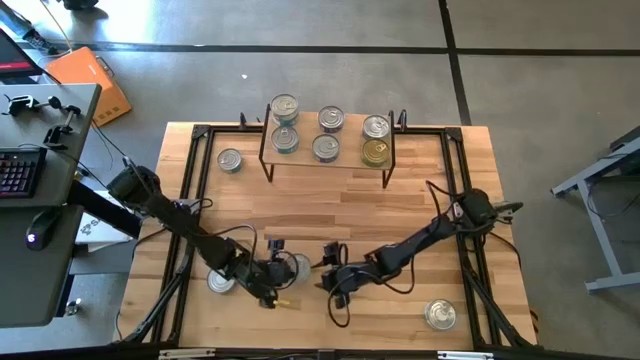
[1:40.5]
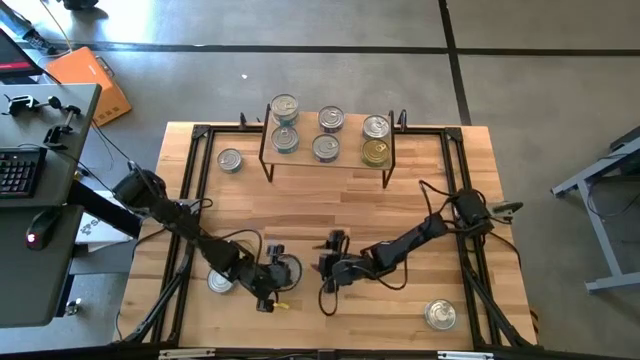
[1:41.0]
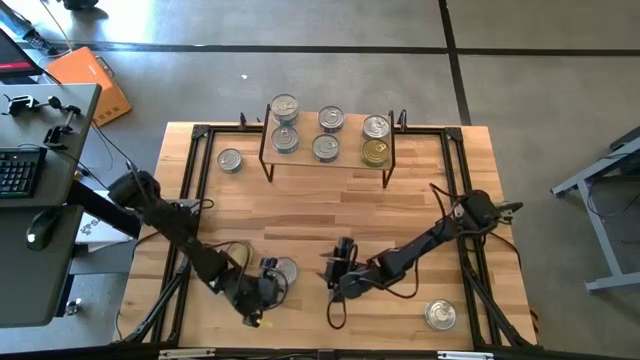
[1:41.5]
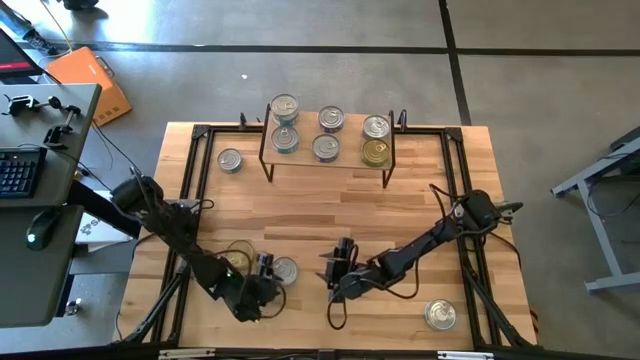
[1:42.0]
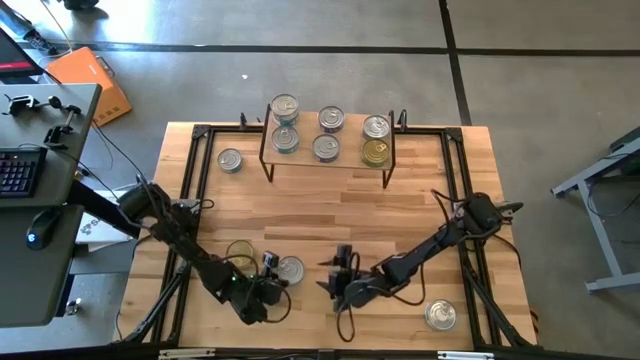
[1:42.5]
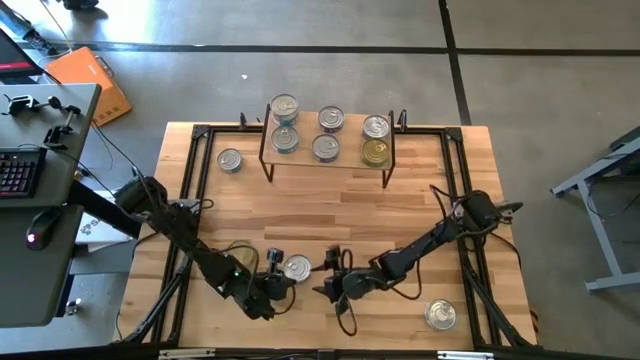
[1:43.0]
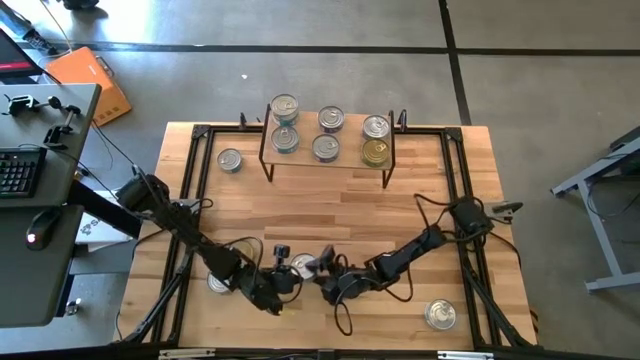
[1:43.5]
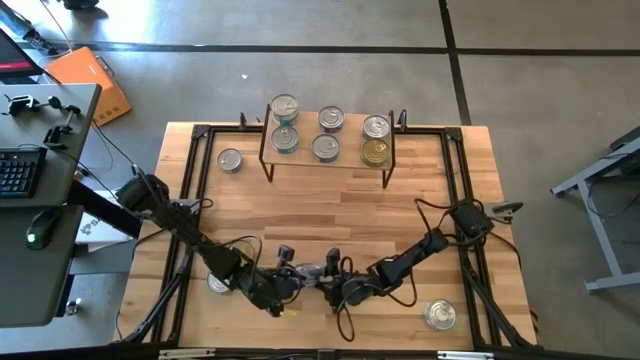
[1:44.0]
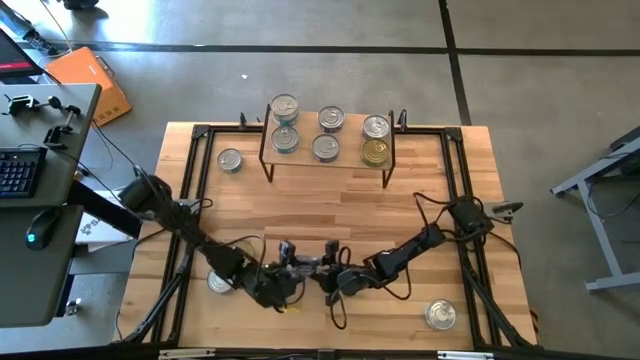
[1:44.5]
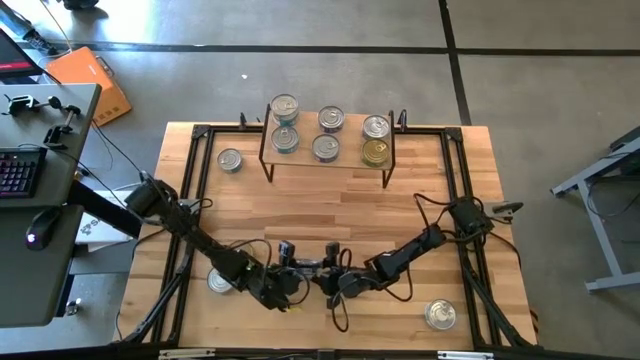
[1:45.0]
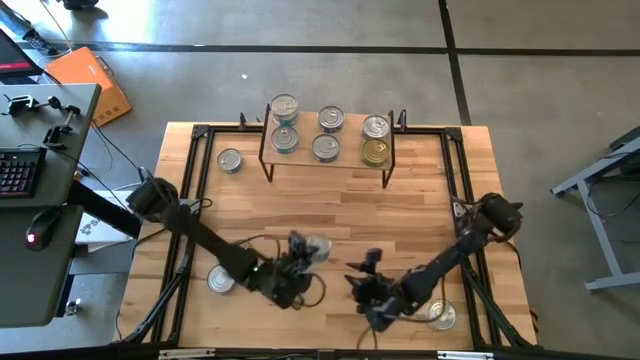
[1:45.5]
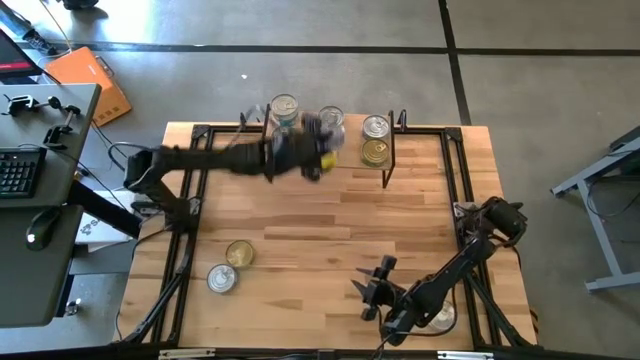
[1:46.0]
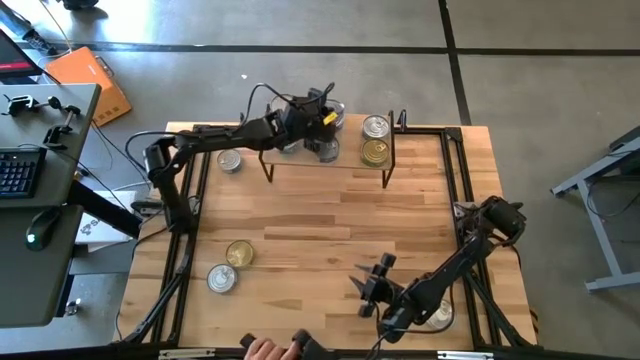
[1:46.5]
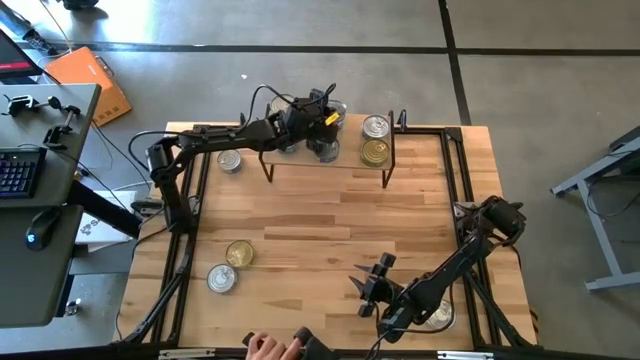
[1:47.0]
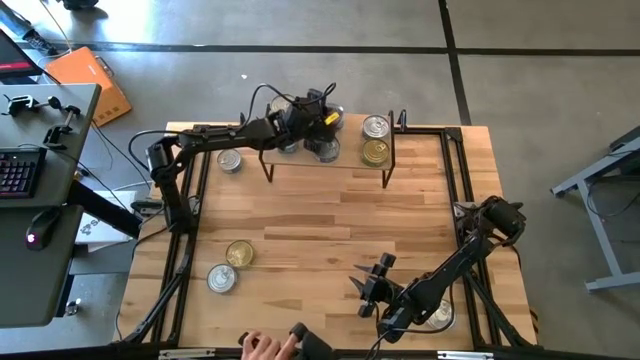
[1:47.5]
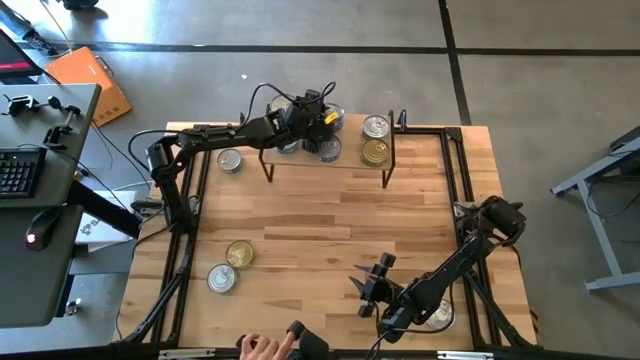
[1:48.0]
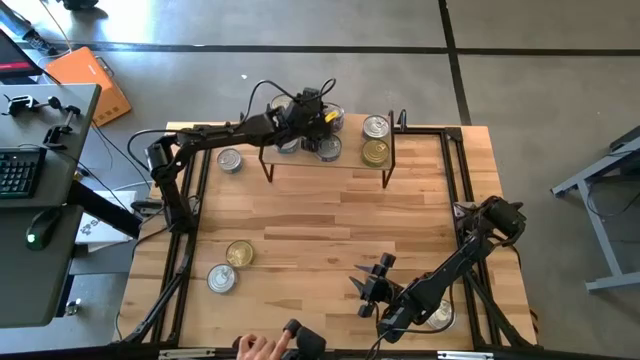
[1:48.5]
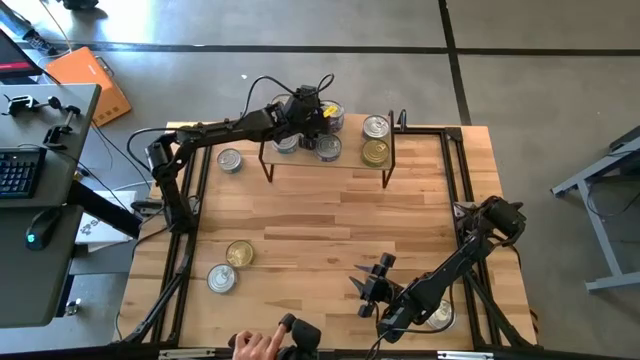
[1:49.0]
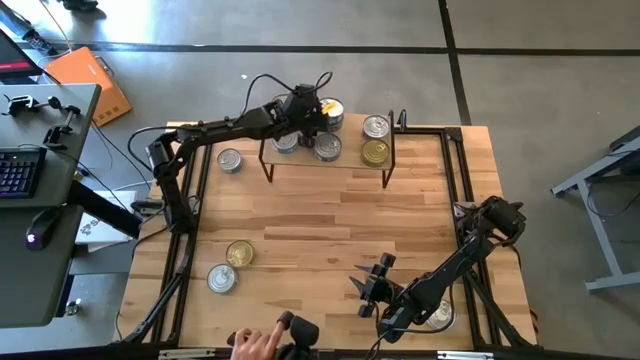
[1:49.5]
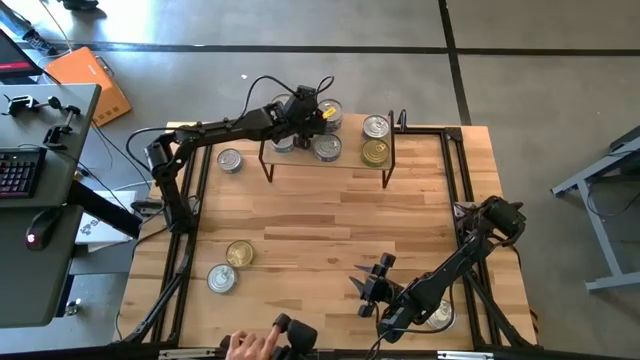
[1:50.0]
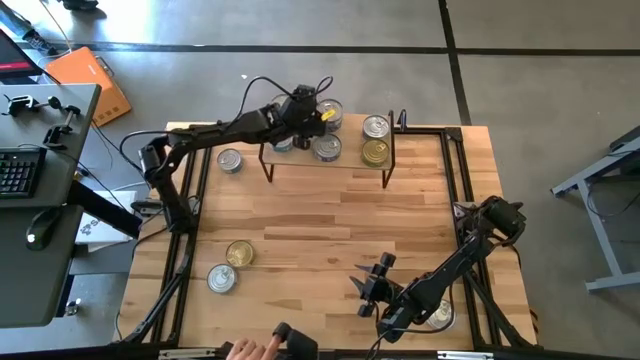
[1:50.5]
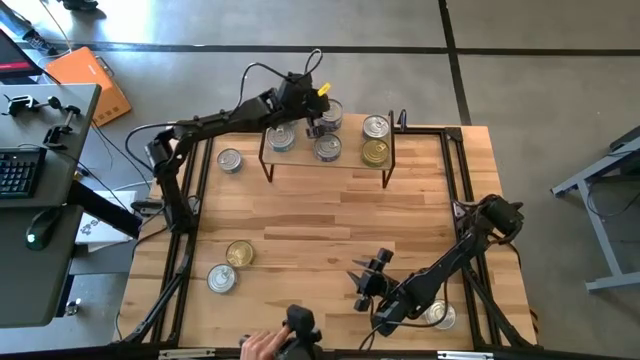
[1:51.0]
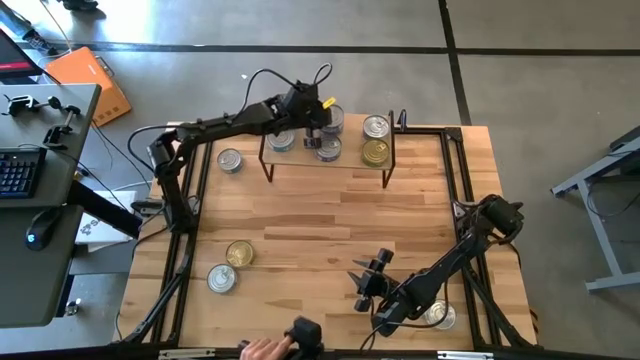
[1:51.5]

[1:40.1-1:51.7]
Task: Stack canned seafood by type on shelf
Stack the blue tuna can on top of the blue tuna can on the shelf

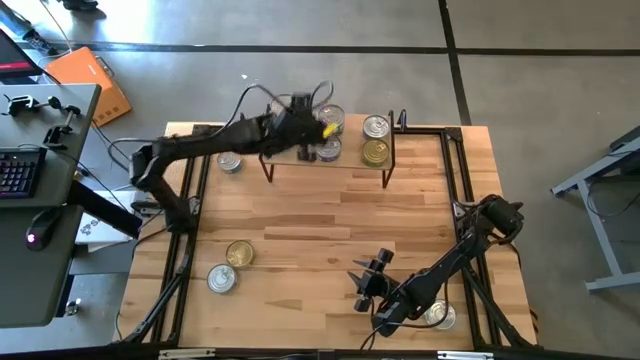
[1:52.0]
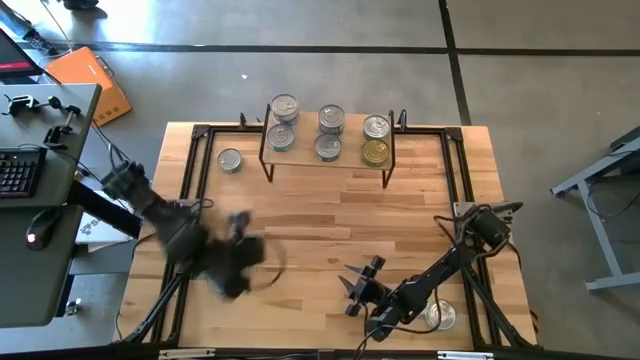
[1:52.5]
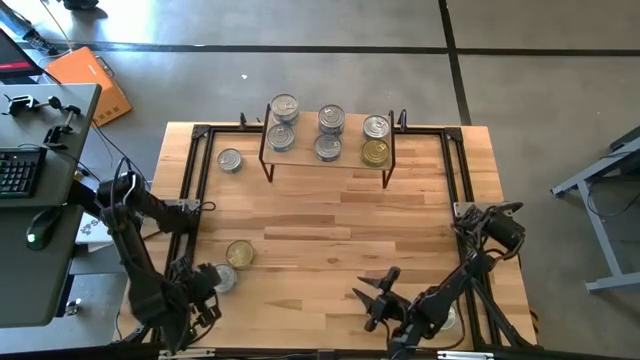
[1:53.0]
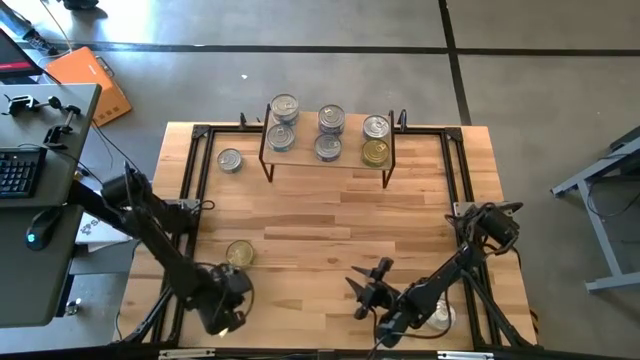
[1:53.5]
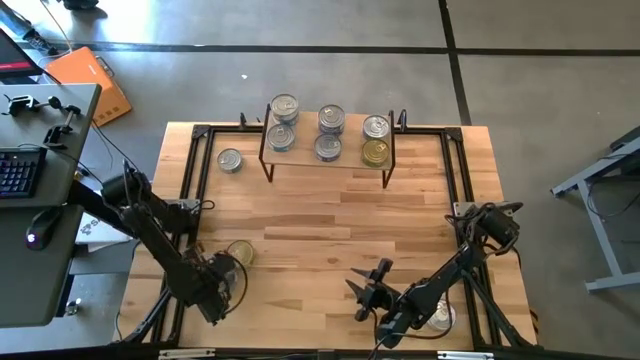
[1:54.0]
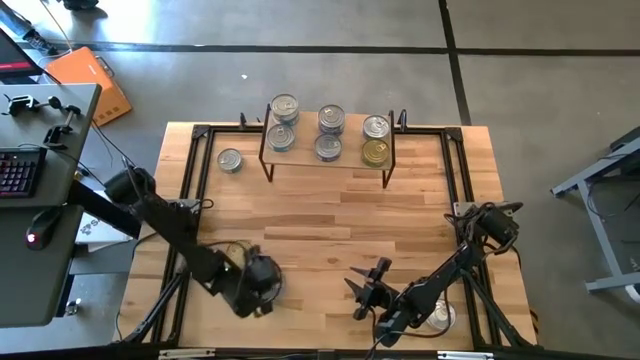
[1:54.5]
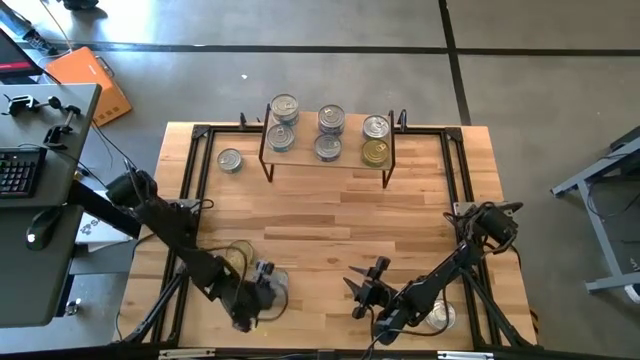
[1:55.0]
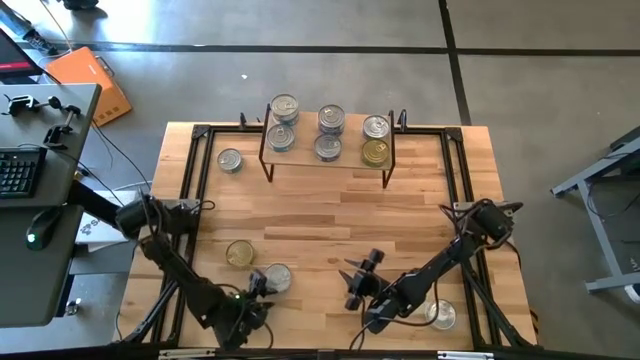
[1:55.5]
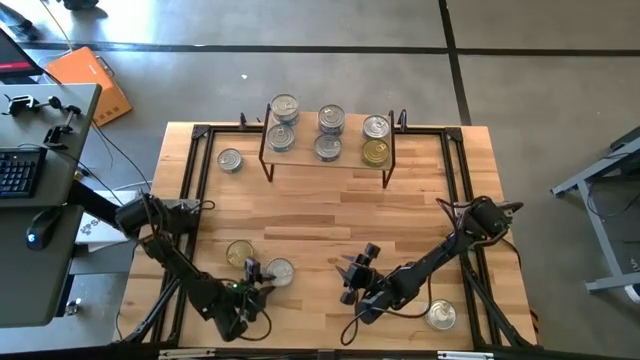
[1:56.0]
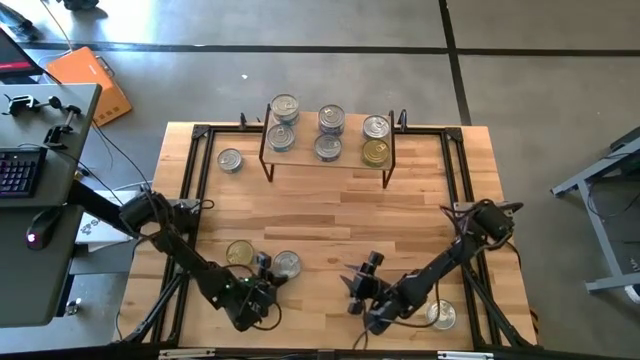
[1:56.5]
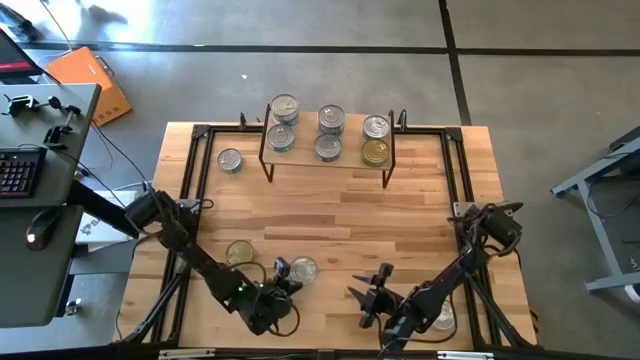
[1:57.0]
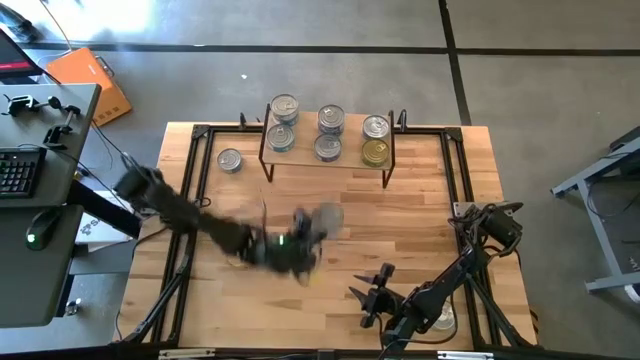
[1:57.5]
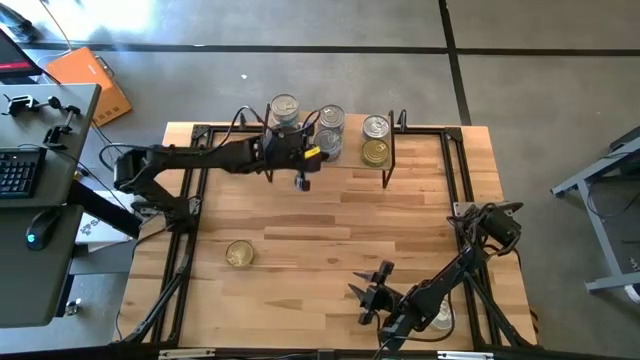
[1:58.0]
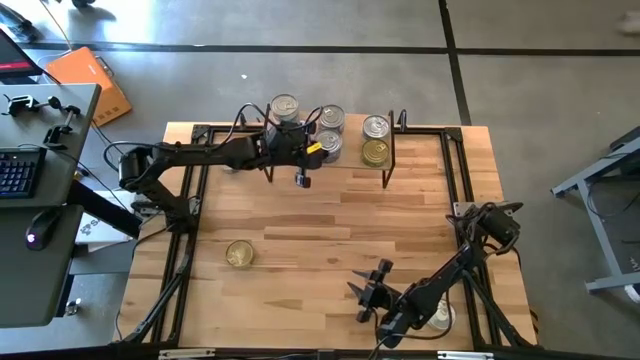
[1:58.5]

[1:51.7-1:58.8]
Stack the blue tuna can on top of the blue tuna can on the shelf

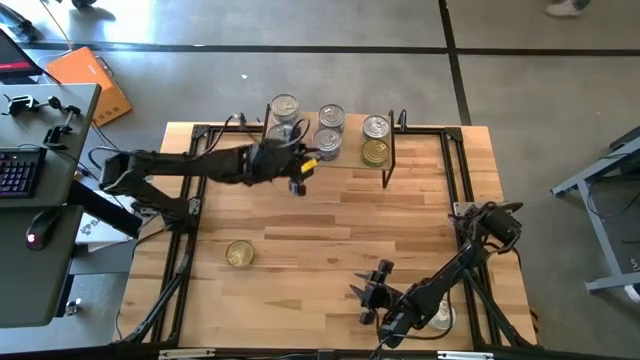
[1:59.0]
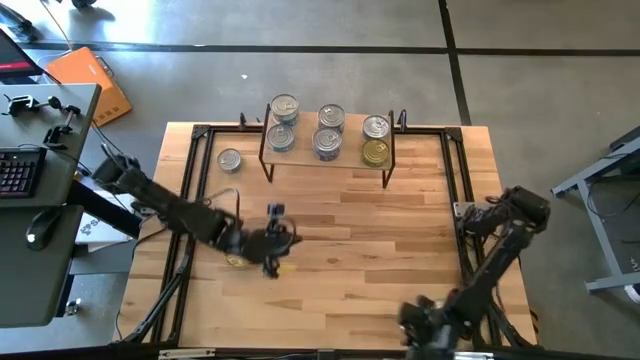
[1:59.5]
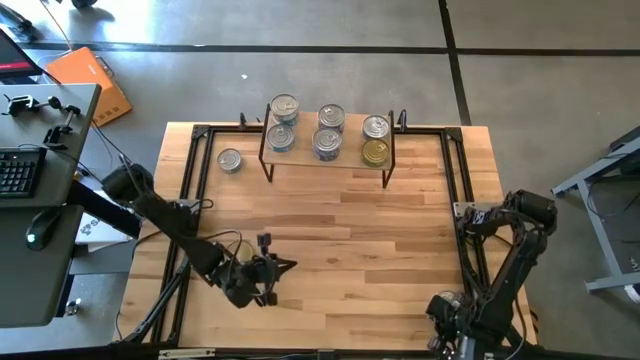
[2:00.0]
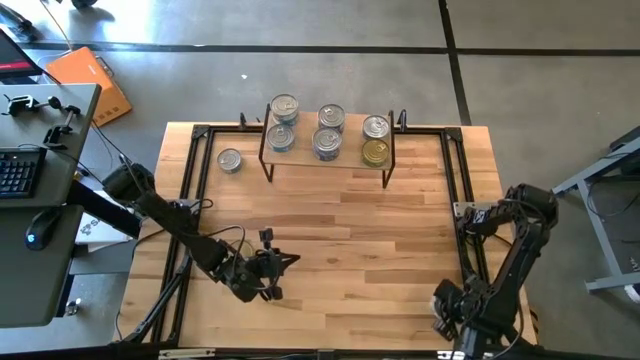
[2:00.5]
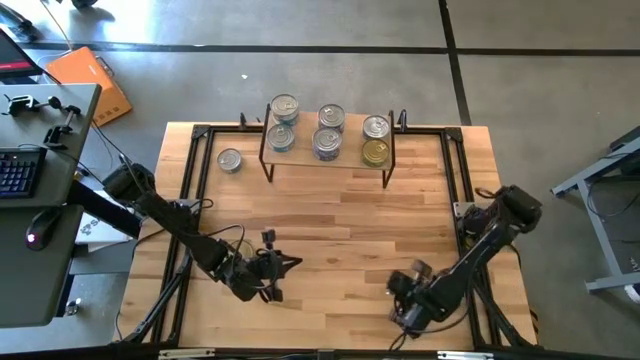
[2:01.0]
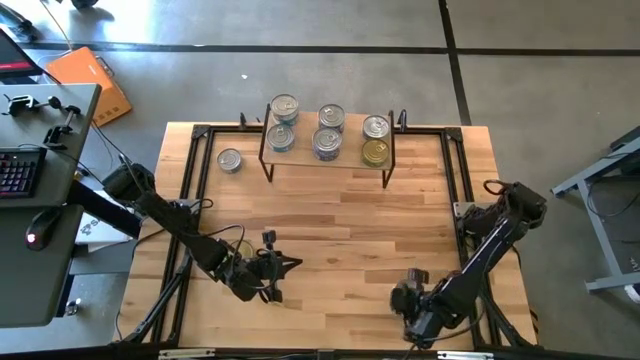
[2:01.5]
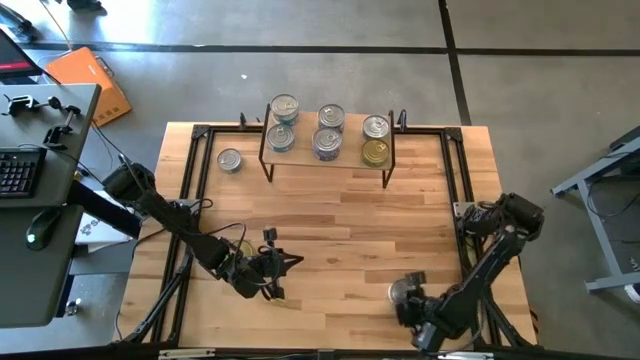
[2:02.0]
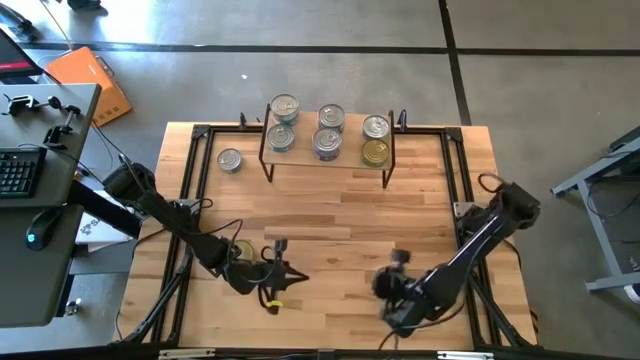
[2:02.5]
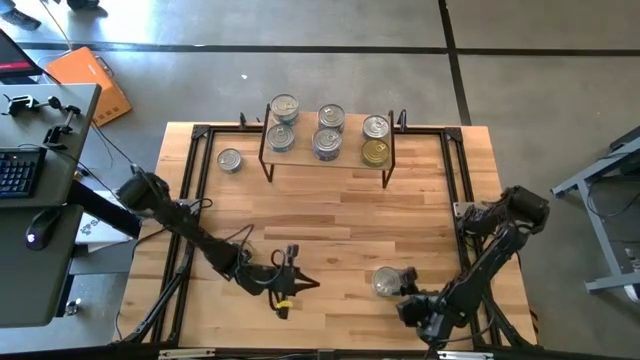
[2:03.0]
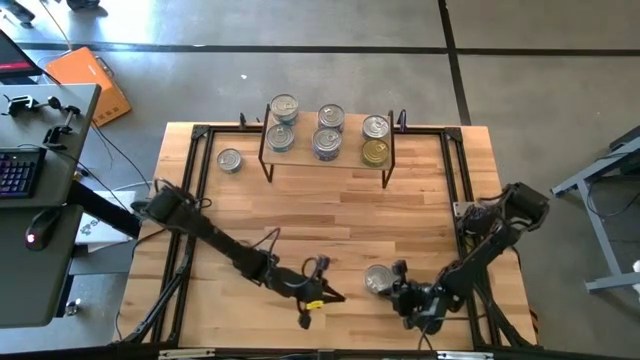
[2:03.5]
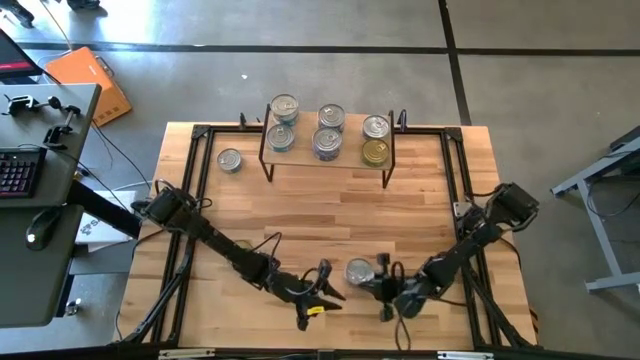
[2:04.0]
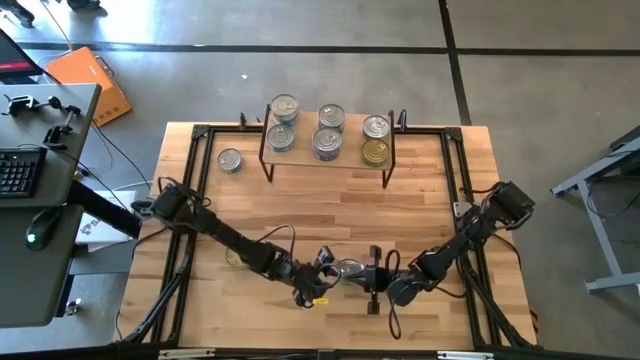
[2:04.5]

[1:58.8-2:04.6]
Stack the green tuna can on top of the green tuna can on the shelf
